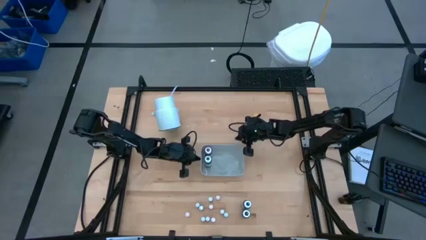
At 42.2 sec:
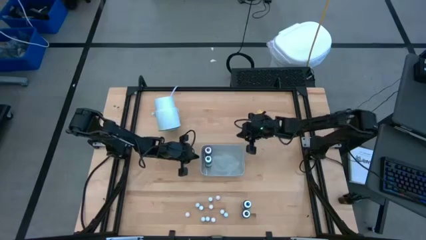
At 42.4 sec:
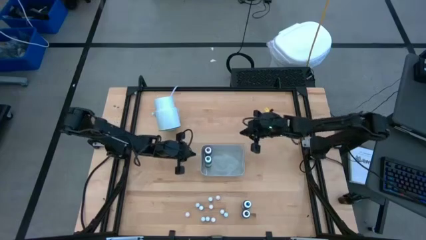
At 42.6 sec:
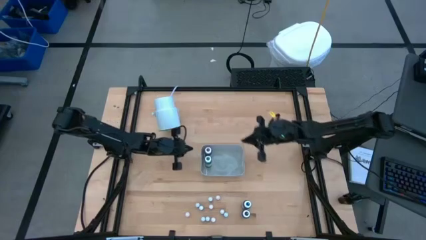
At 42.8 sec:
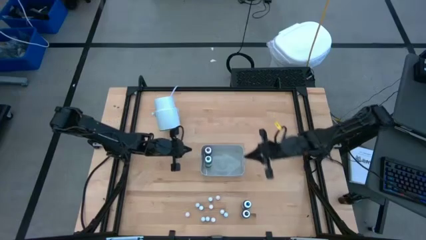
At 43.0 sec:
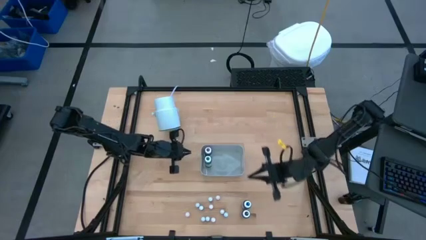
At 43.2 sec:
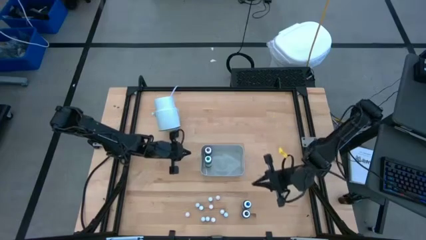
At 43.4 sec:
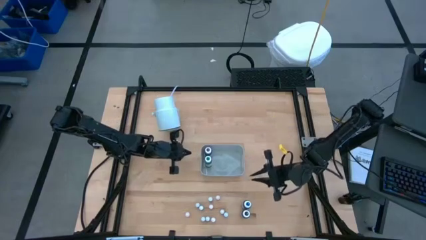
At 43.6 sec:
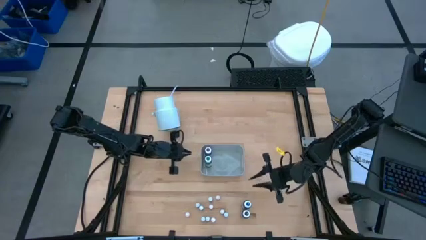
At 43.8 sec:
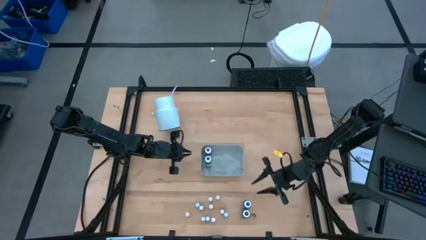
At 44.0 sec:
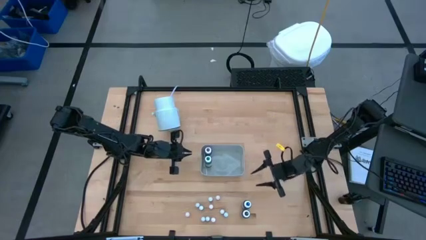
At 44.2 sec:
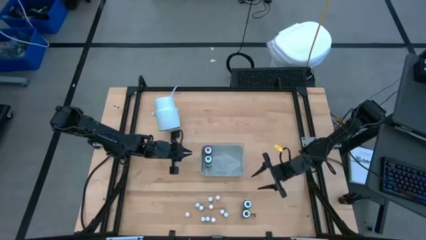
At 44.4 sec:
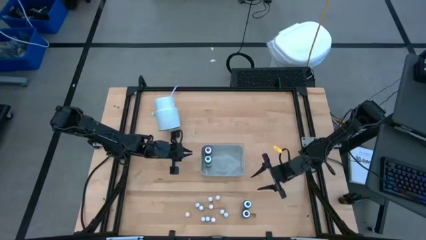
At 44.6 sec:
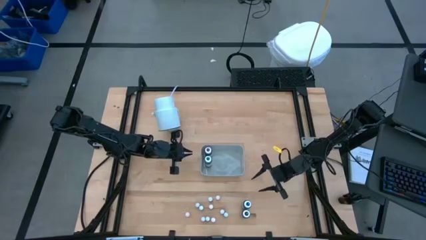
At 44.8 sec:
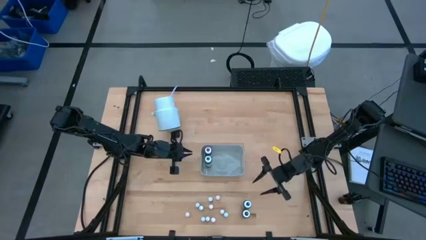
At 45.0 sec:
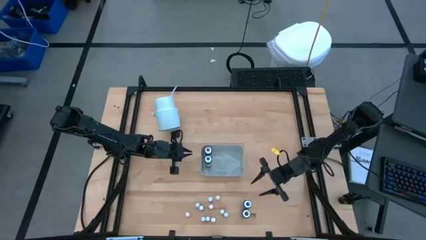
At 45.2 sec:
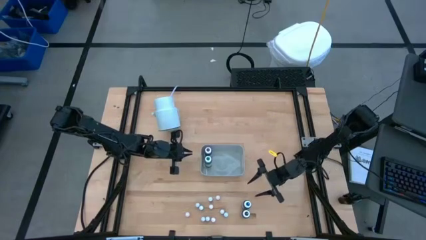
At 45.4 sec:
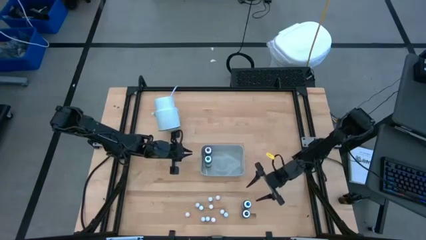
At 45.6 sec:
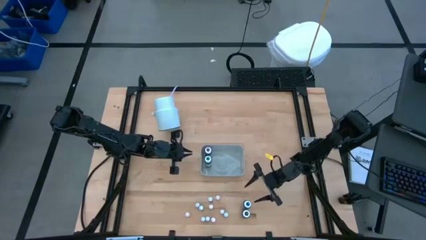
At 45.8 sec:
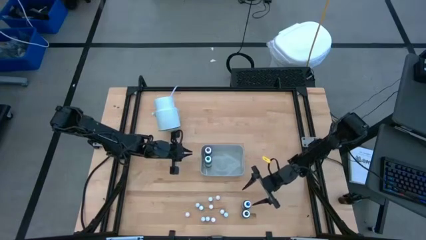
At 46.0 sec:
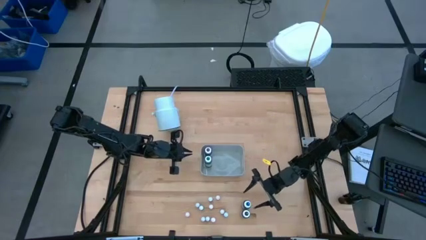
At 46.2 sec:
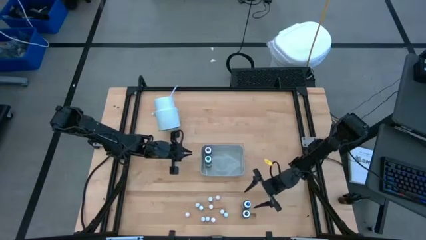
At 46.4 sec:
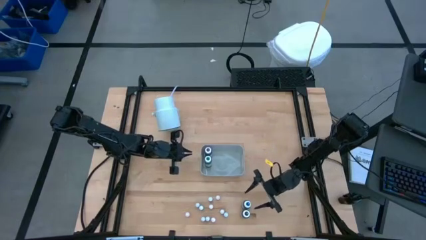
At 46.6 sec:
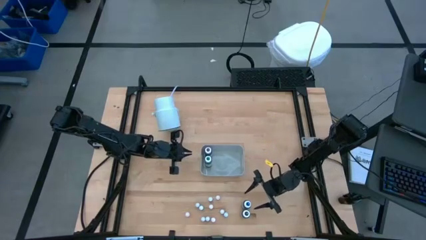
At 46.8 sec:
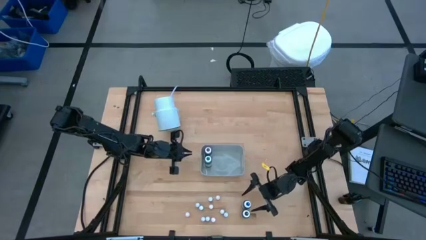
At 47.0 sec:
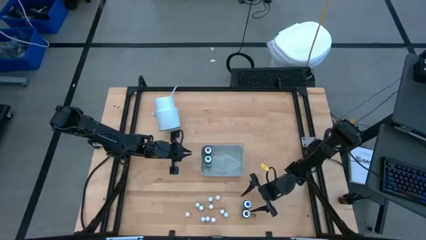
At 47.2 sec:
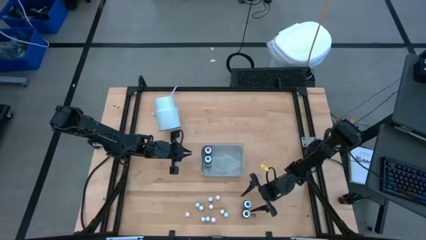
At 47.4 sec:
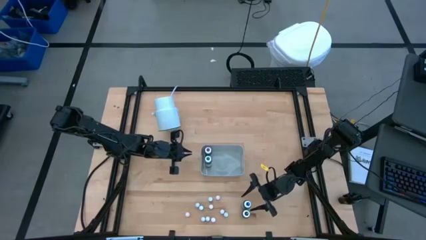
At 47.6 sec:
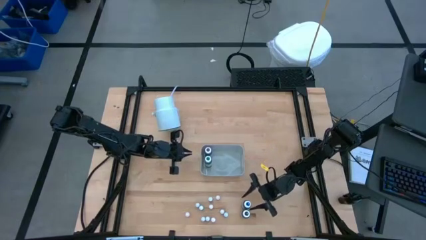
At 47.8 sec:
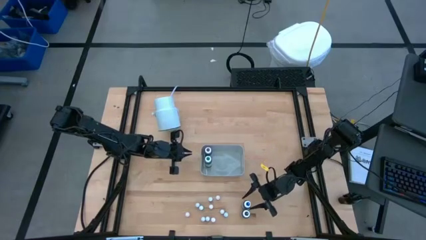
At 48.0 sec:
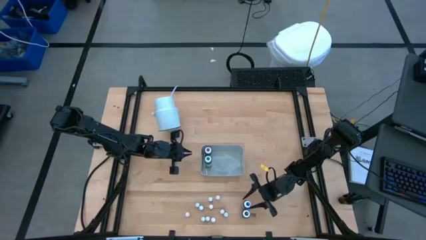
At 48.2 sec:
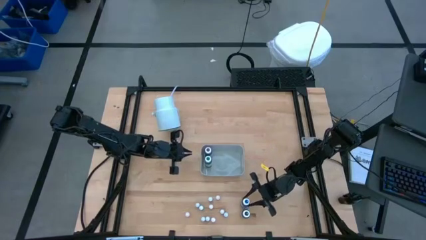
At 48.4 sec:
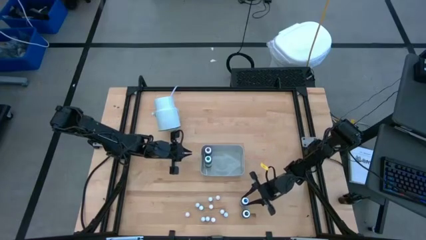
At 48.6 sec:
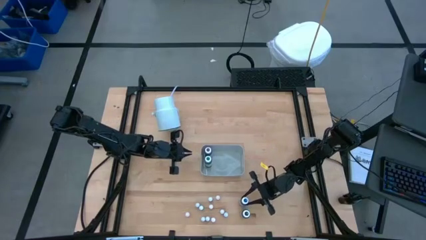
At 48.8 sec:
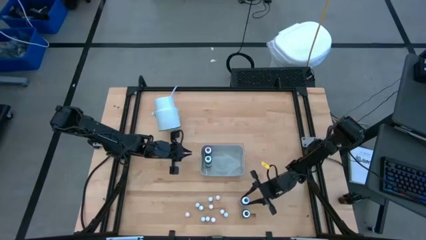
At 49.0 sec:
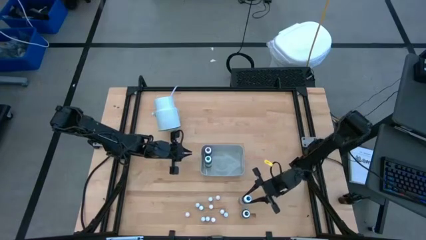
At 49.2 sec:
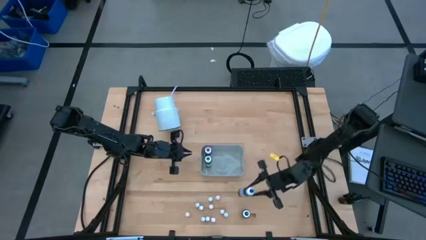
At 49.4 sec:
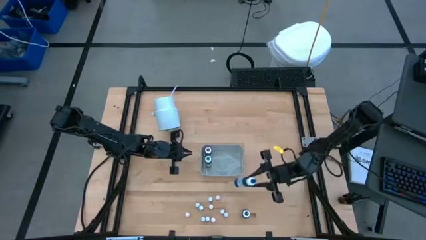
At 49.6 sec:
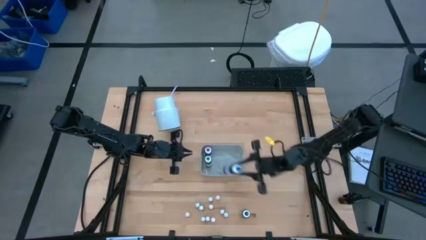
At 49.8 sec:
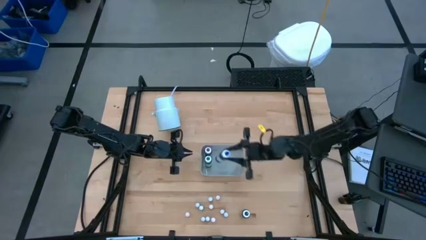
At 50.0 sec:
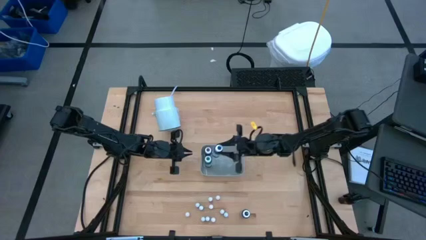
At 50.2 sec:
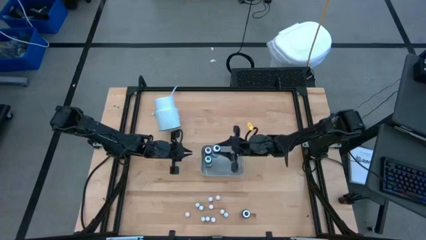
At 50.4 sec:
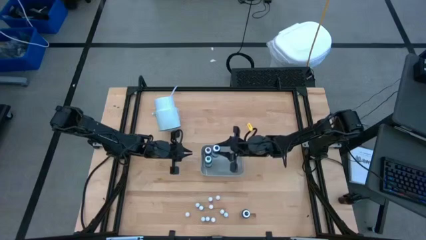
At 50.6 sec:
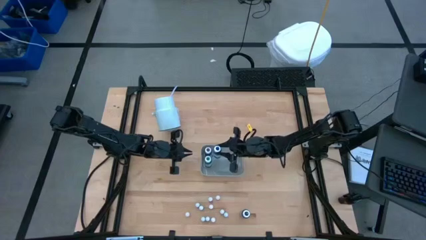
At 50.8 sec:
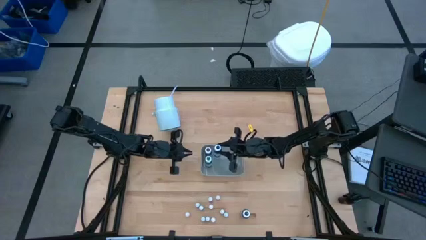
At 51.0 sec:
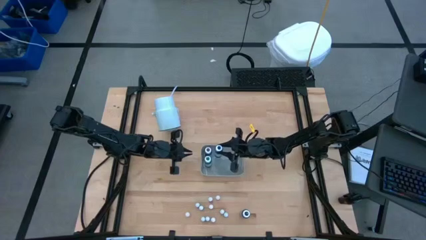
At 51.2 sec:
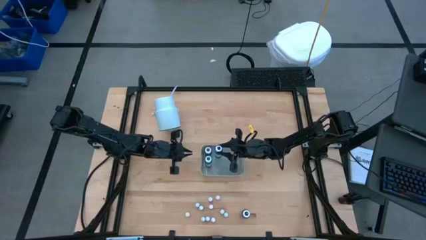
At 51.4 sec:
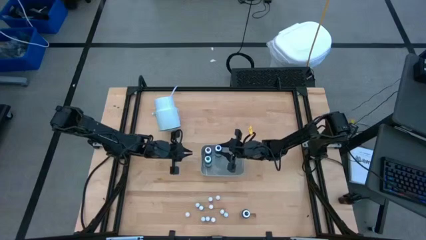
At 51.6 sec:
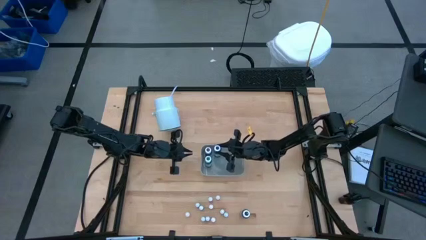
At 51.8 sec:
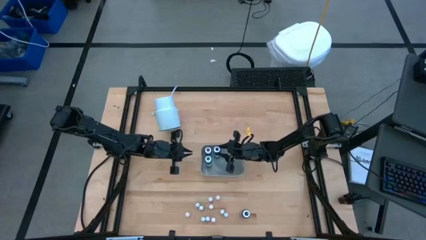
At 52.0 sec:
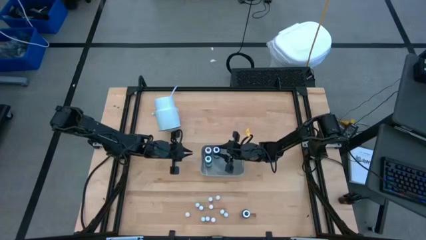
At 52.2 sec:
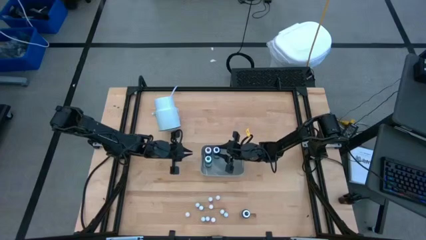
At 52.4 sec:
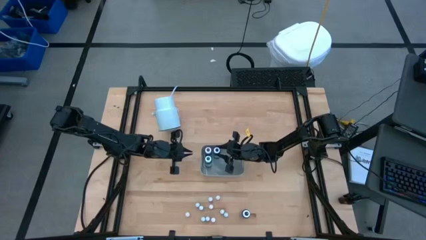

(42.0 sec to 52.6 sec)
Task: Pick & Place food coloring
Put the large blue food coloring bottle into the bin

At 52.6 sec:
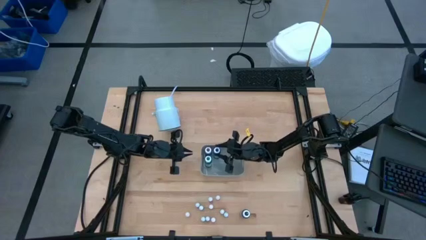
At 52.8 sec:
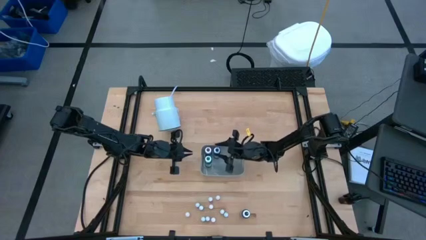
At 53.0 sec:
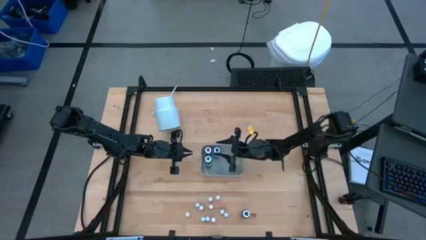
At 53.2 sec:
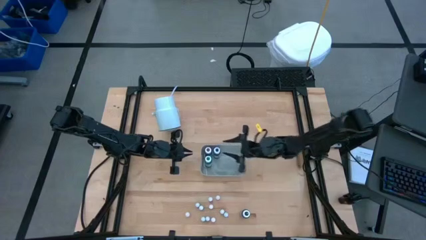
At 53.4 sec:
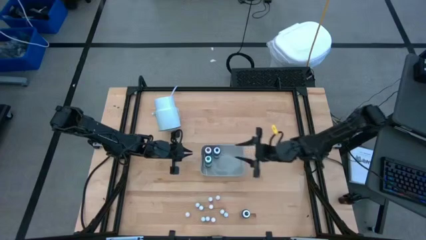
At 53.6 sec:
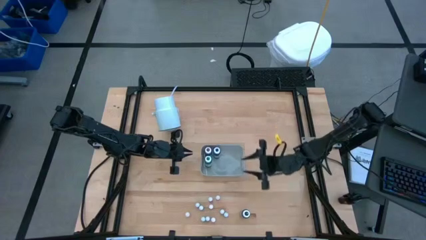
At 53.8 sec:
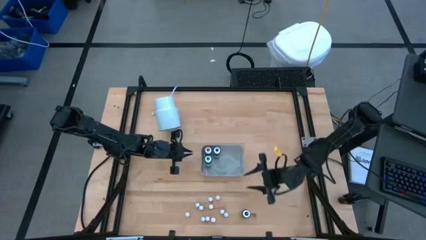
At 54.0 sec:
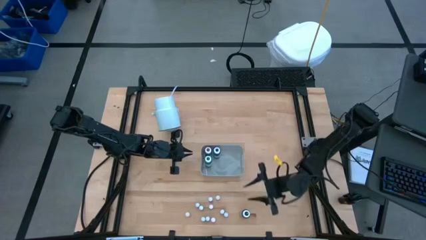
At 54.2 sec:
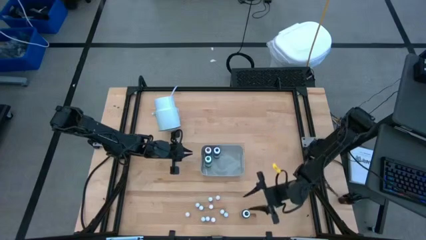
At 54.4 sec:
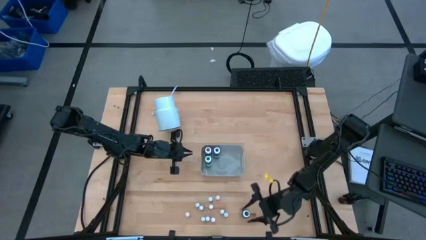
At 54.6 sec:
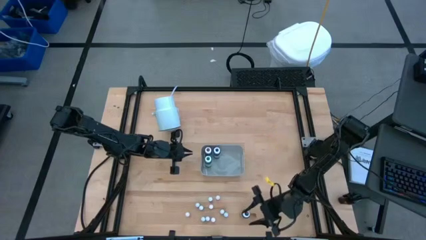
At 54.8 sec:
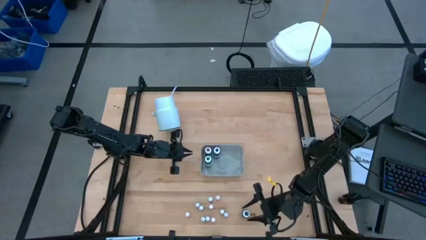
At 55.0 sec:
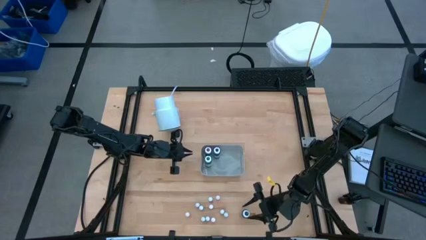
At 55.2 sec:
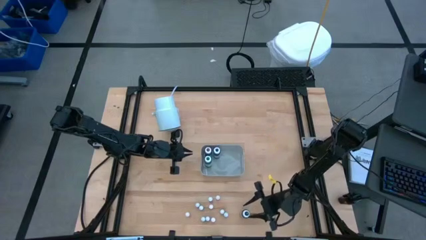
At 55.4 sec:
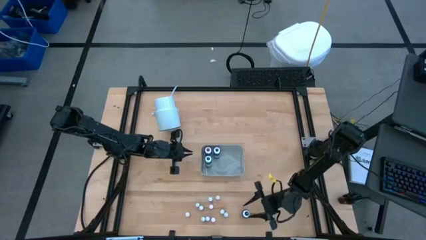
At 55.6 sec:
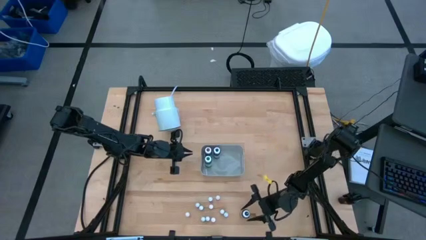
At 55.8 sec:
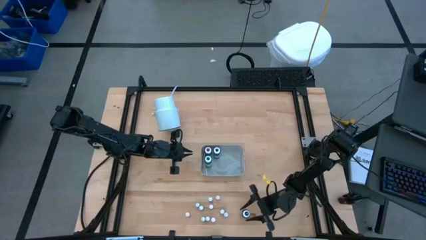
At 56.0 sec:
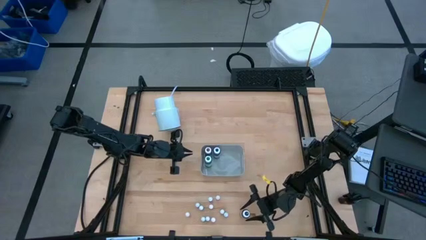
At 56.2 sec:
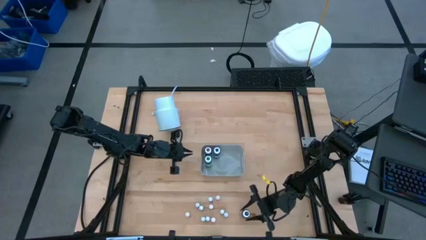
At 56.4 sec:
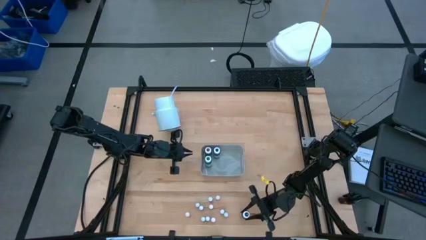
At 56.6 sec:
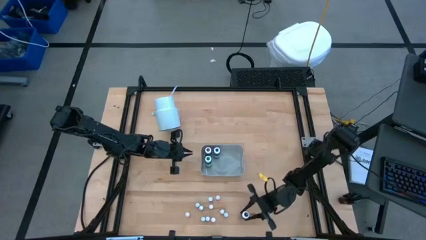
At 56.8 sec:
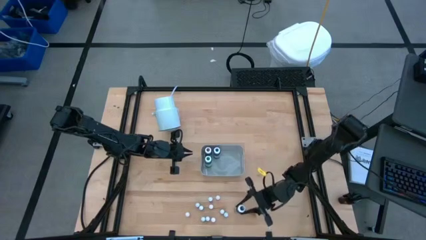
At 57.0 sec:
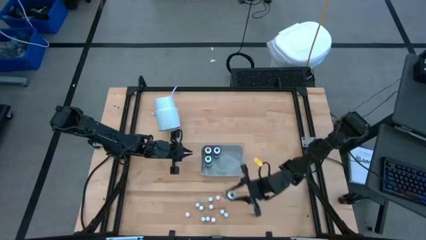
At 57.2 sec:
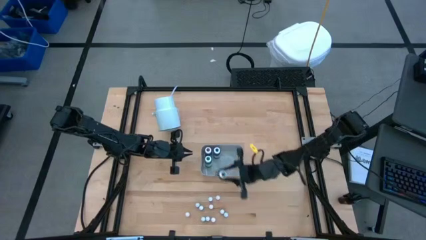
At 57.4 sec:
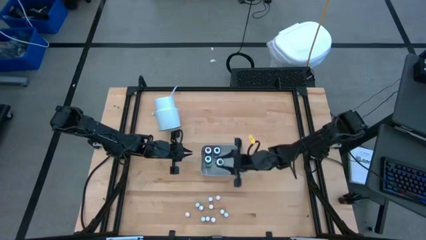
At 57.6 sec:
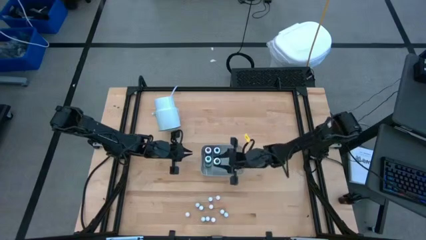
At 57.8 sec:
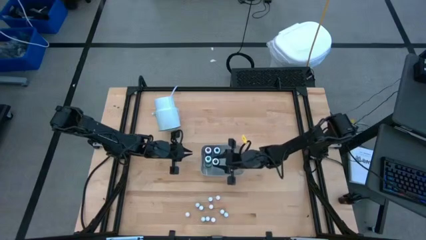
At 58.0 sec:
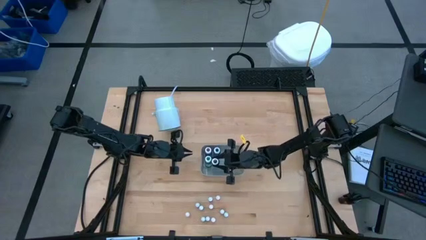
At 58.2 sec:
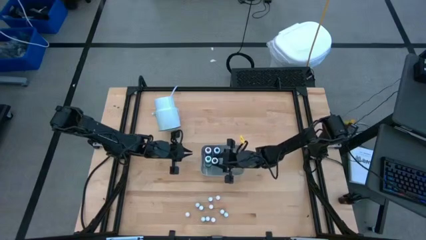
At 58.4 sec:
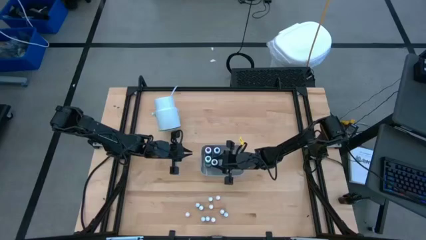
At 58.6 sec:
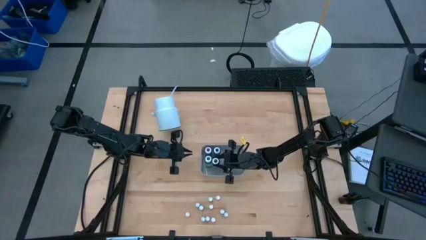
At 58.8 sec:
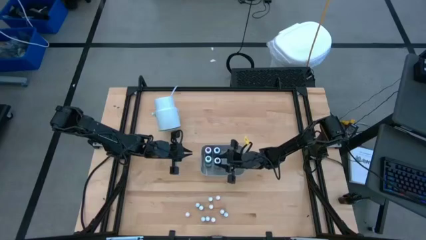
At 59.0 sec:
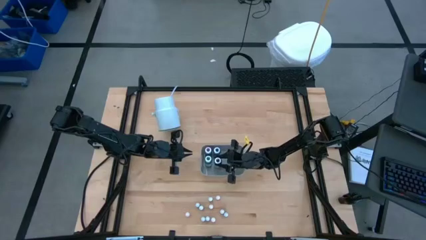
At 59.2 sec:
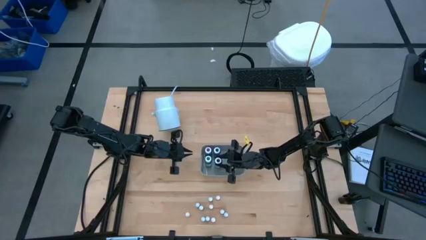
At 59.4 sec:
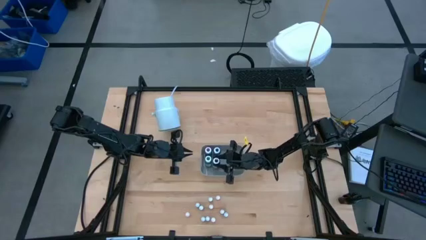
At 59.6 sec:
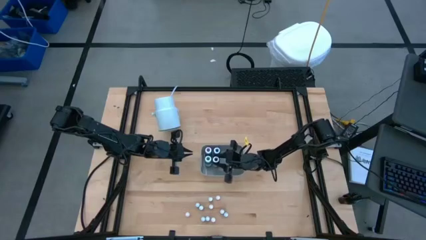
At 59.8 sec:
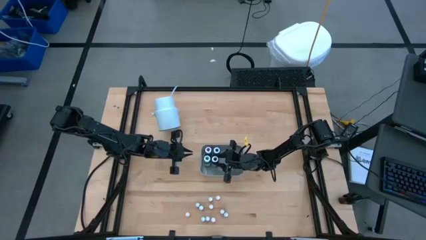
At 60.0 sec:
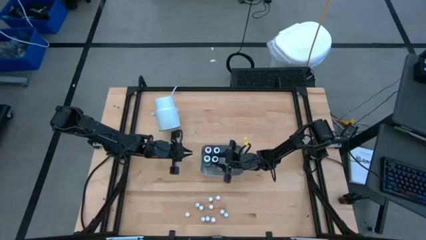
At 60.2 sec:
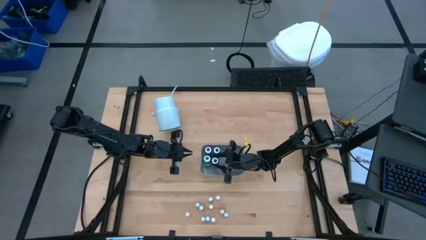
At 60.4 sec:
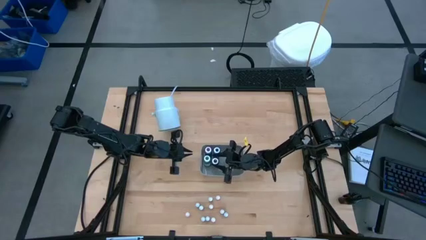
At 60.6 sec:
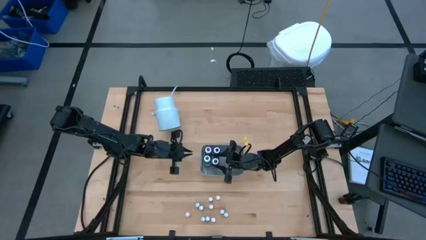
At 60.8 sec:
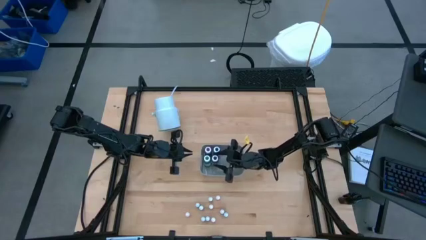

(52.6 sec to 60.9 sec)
Put the large black food coloring bottle into the bin
